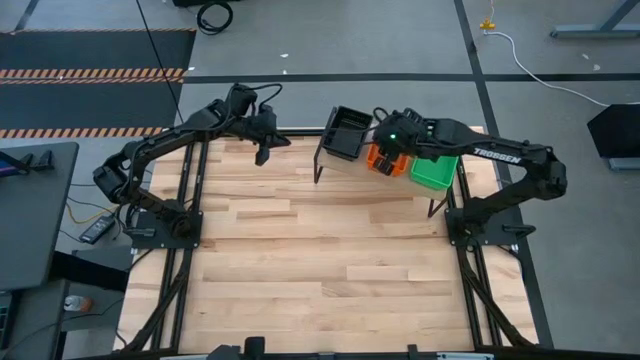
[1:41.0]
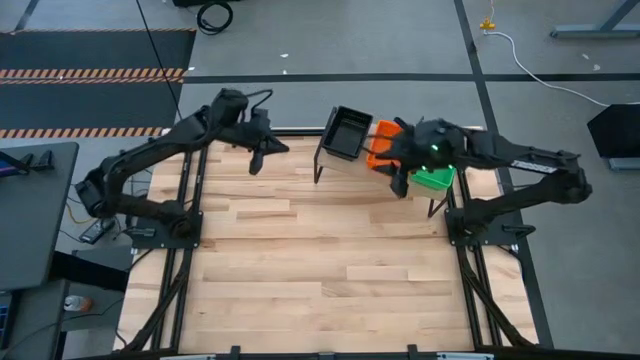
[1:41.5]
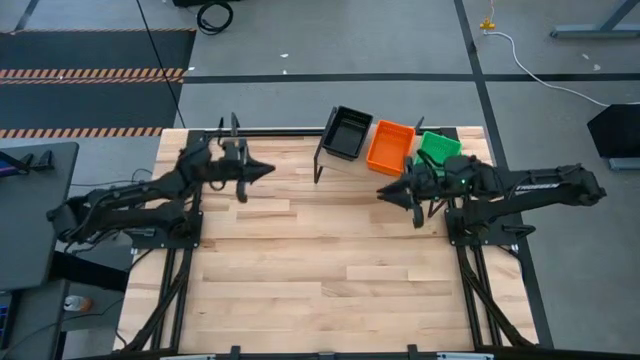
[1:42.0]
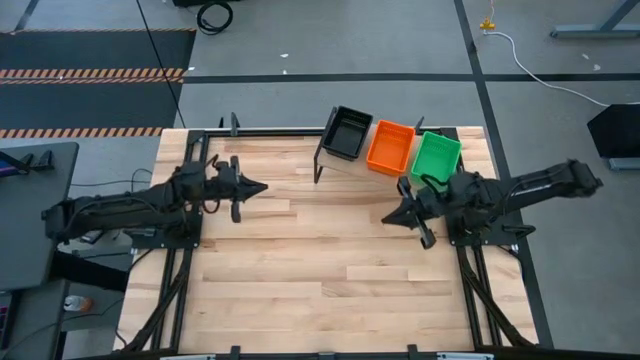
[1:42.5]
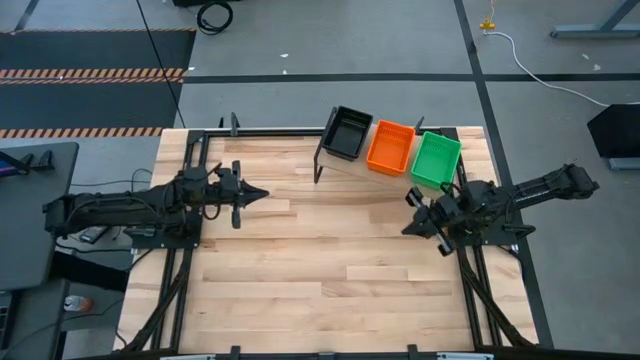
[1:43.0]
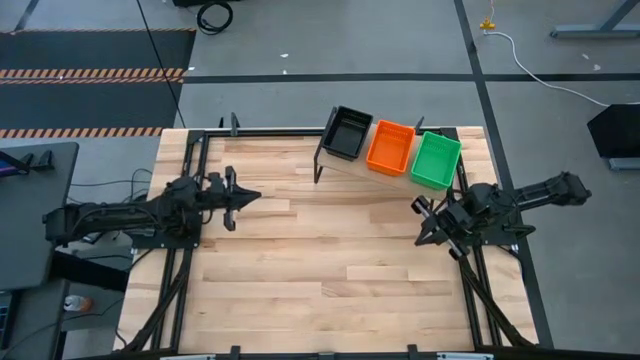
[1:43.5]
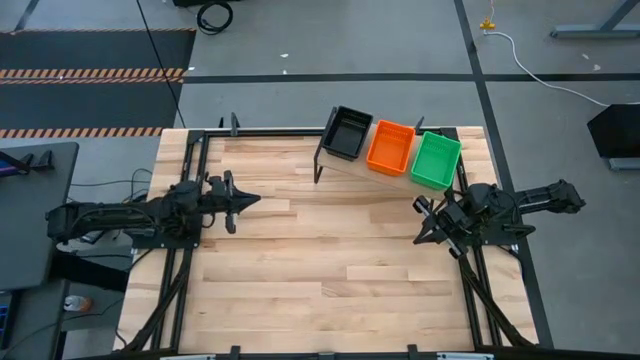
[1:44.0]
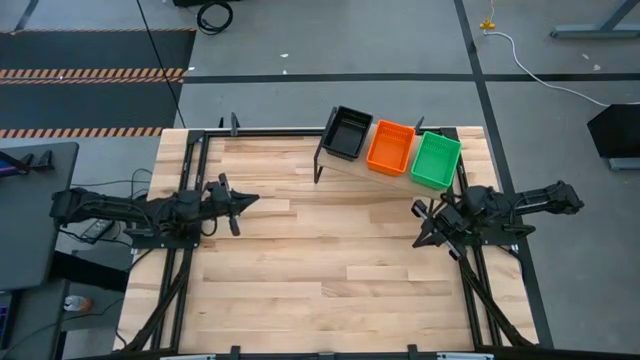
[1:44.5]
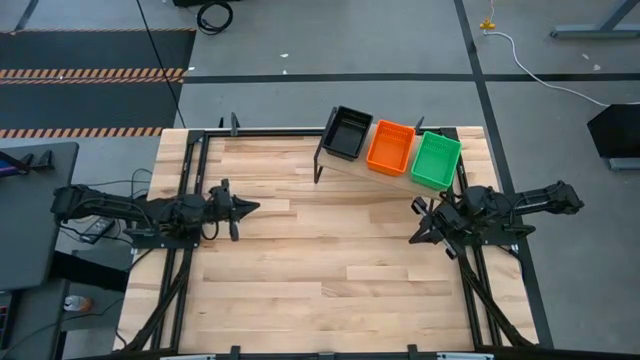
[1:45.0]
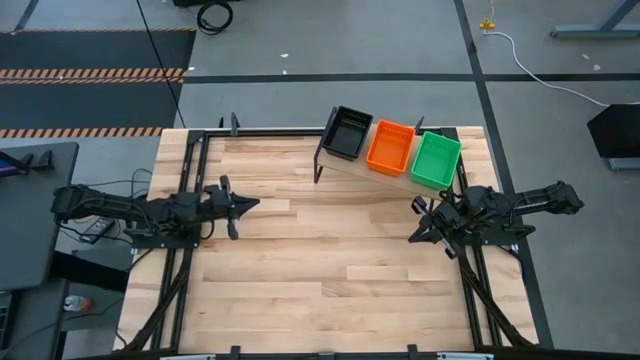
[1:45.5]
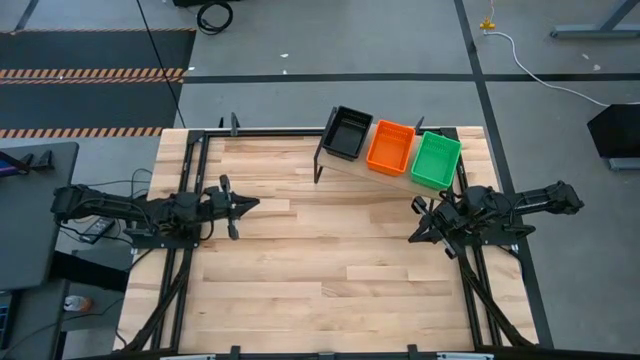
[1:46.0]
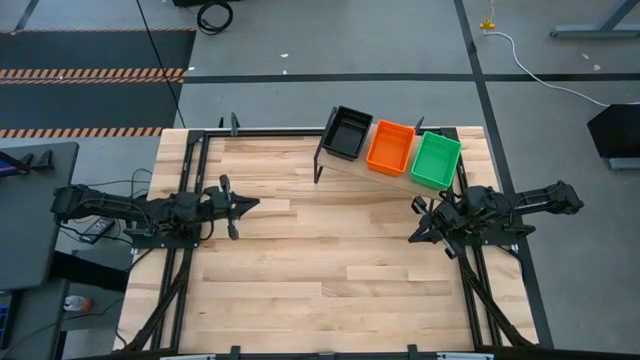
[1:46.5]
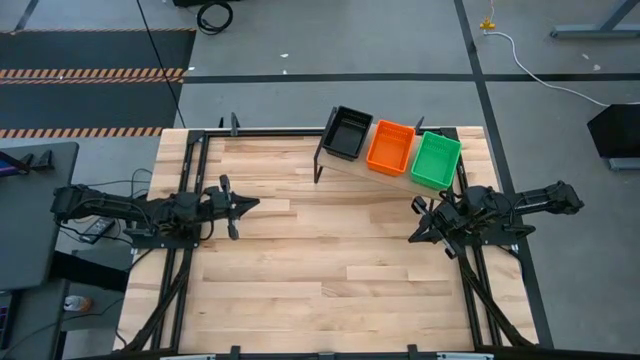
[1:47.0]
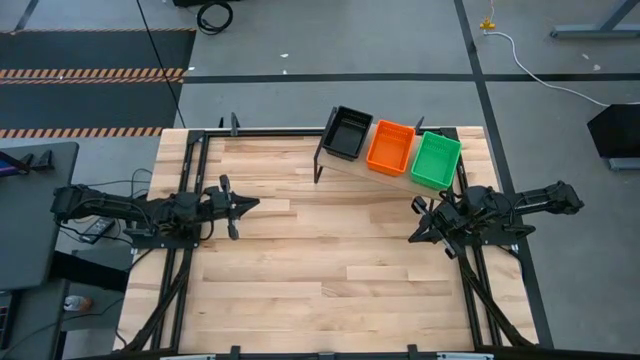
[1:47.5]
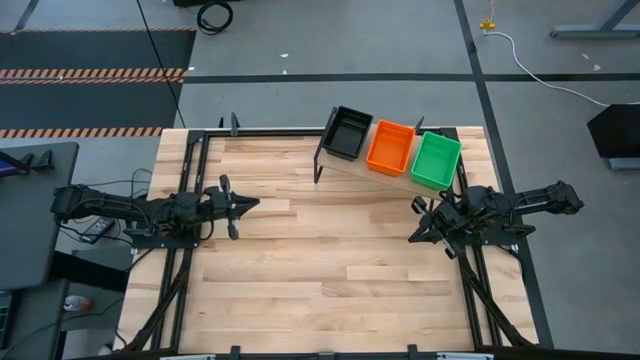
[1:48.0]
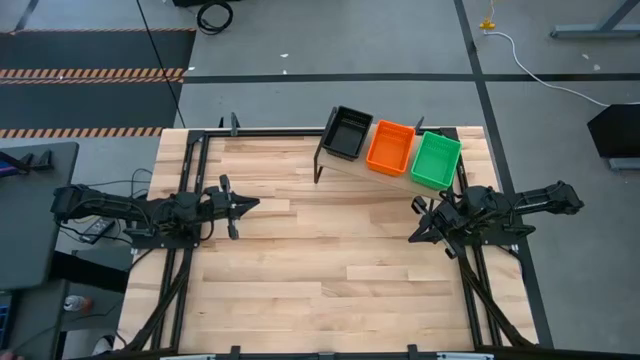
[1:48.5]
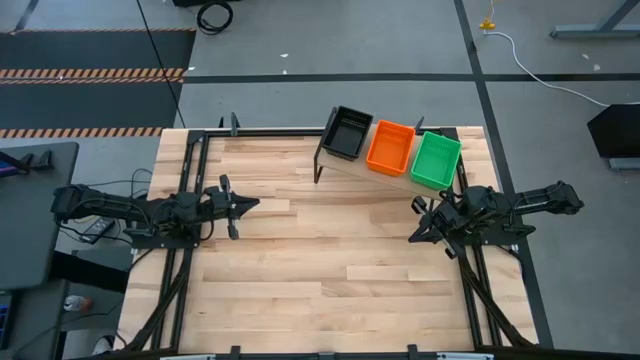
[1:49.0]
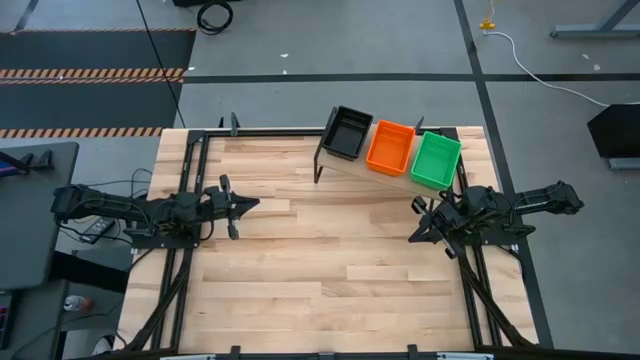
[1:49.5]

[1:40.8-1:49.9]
Task: Stack baskets on shelf by color
Return to Home Position

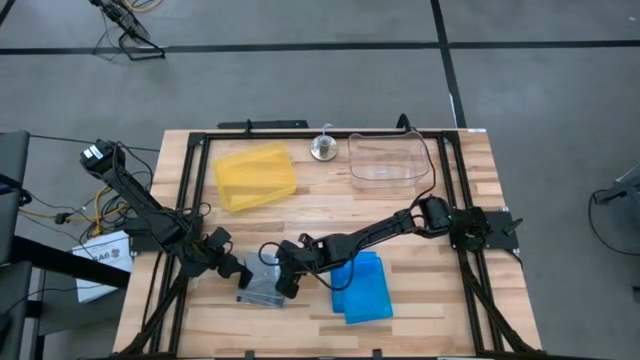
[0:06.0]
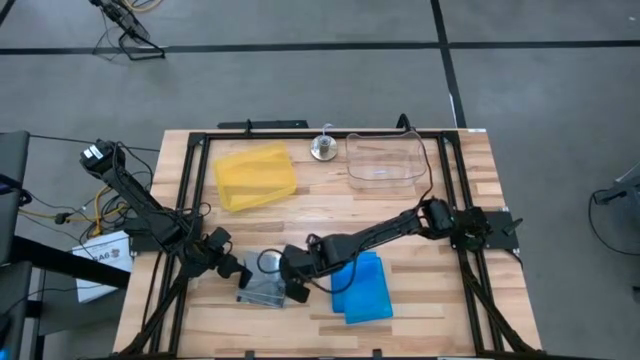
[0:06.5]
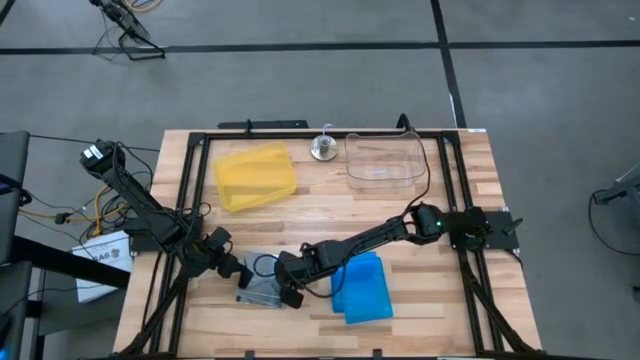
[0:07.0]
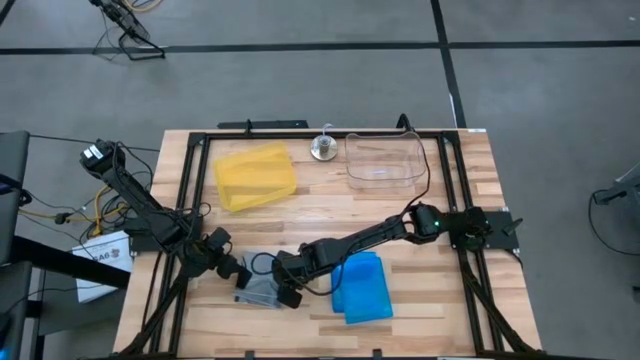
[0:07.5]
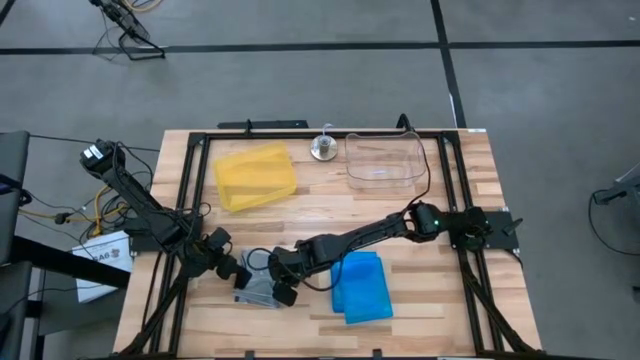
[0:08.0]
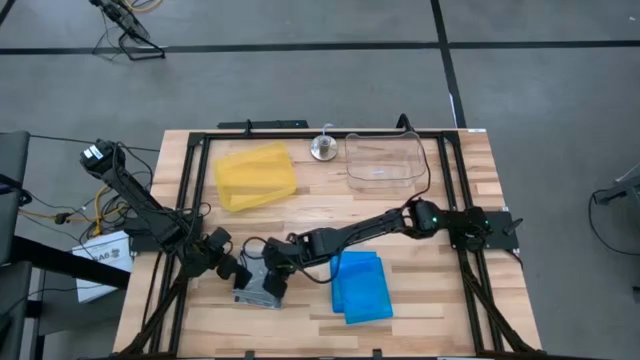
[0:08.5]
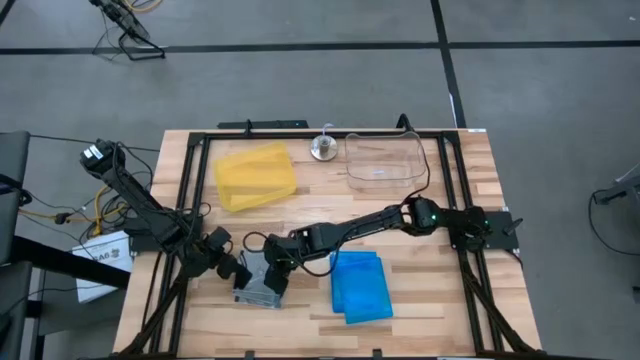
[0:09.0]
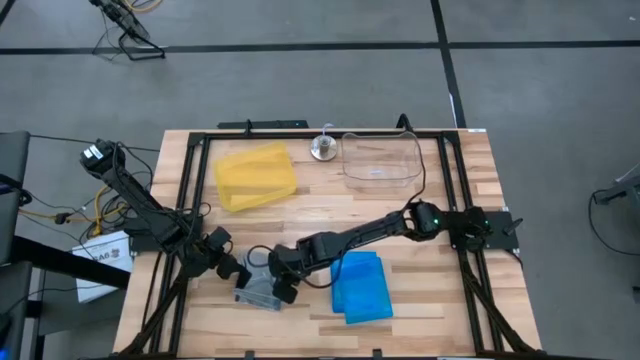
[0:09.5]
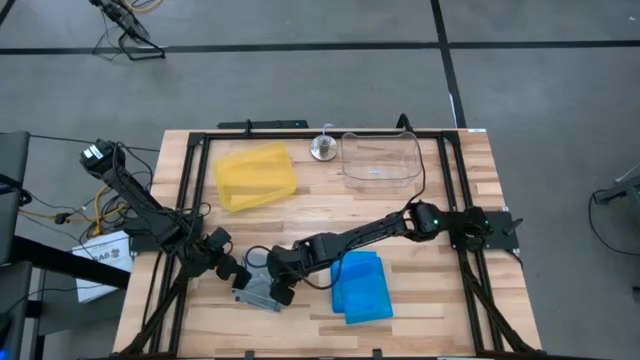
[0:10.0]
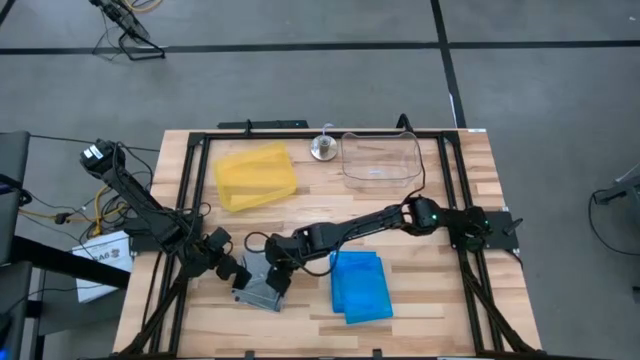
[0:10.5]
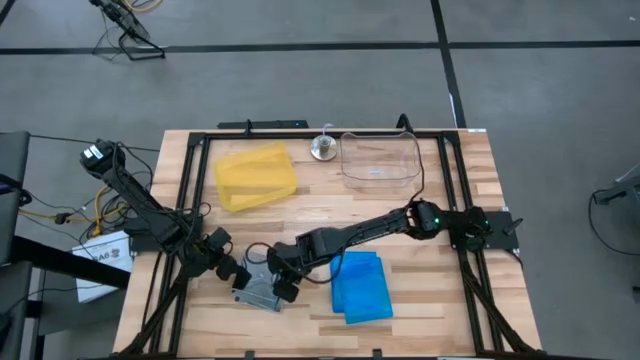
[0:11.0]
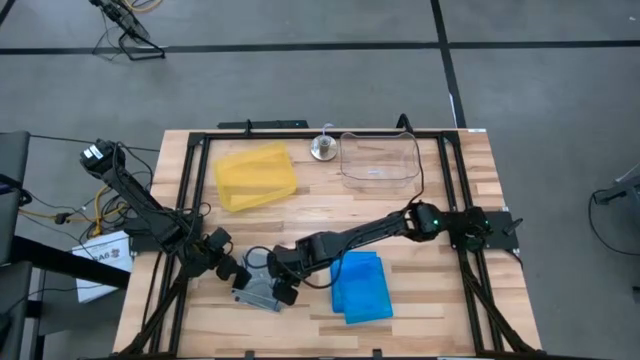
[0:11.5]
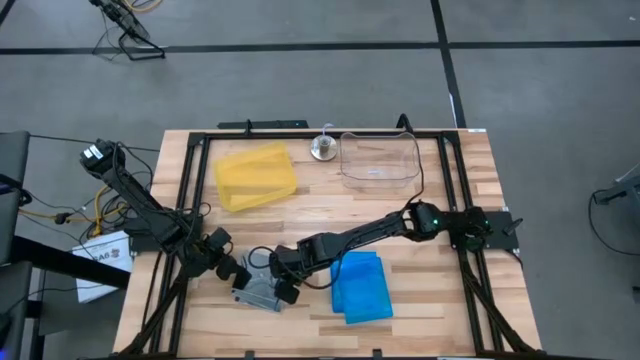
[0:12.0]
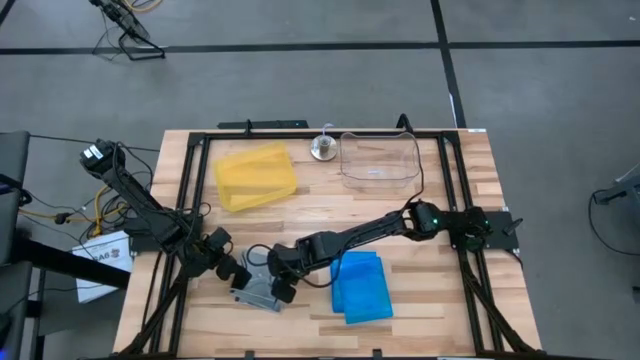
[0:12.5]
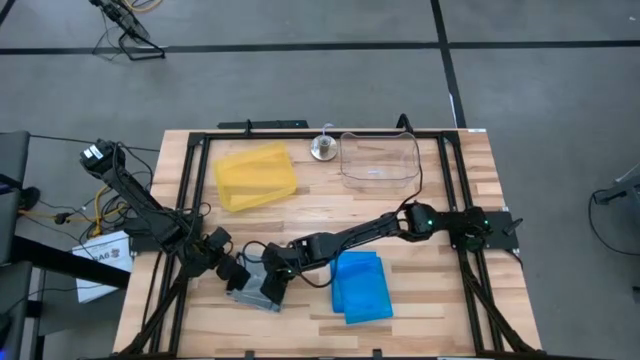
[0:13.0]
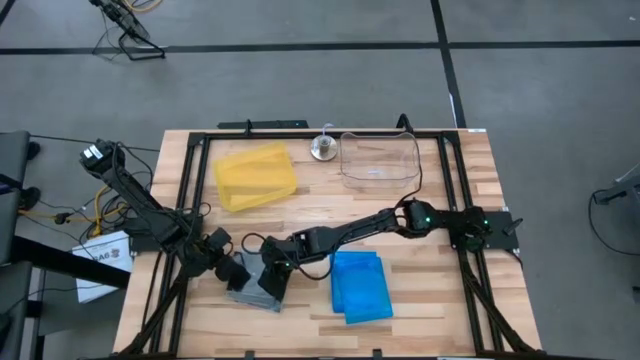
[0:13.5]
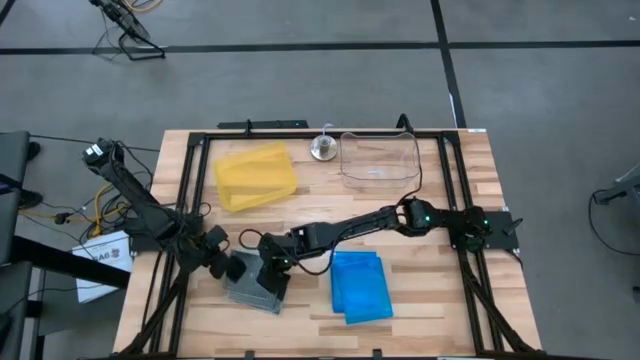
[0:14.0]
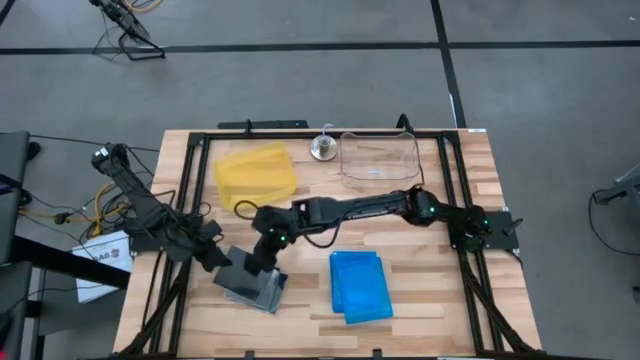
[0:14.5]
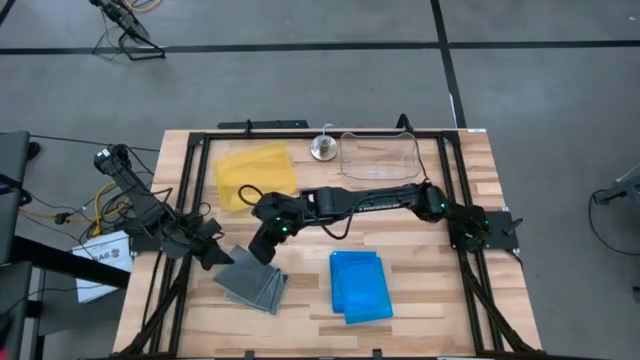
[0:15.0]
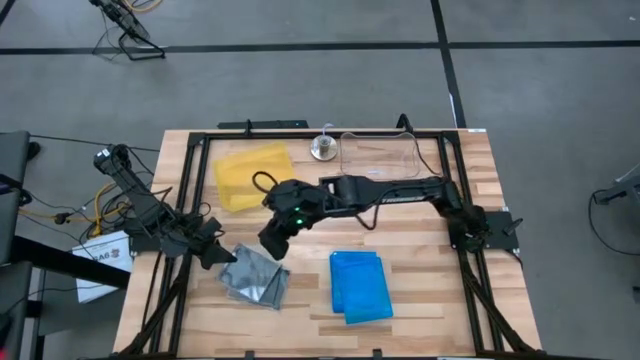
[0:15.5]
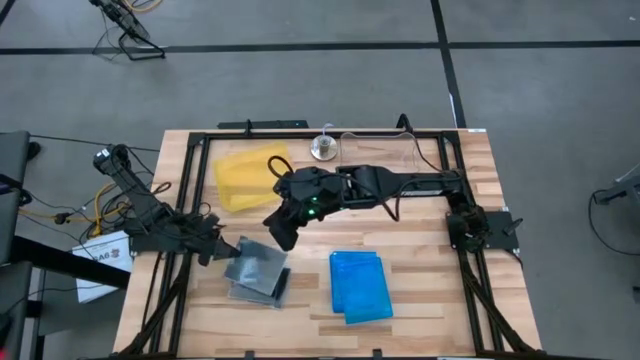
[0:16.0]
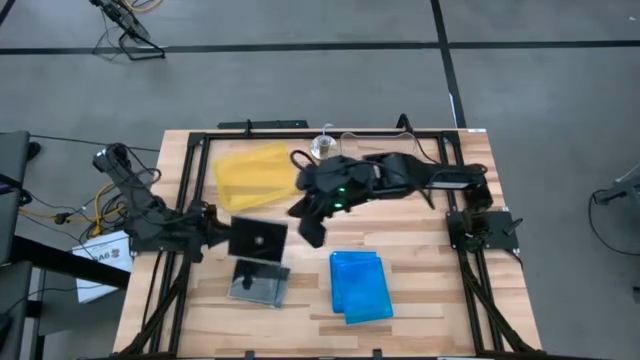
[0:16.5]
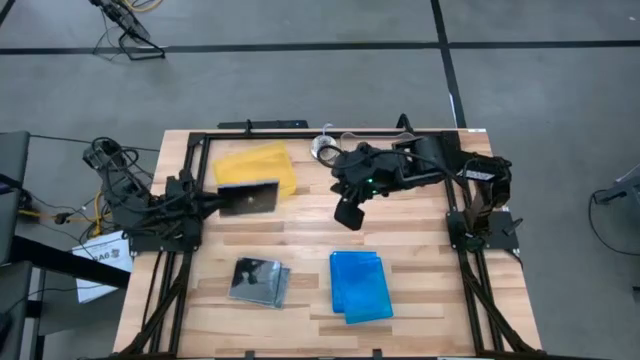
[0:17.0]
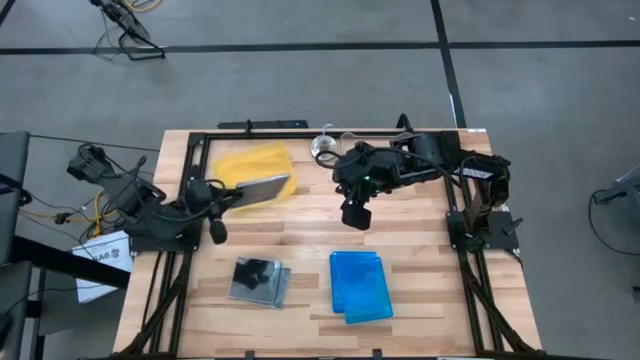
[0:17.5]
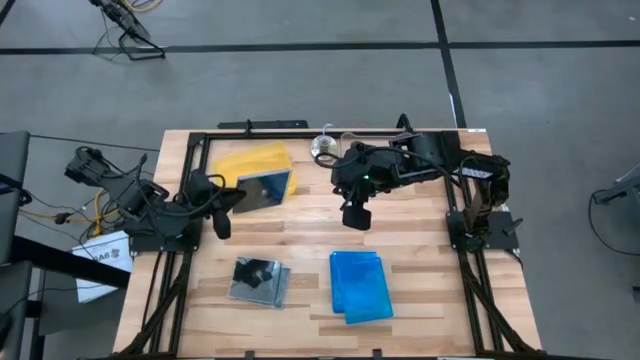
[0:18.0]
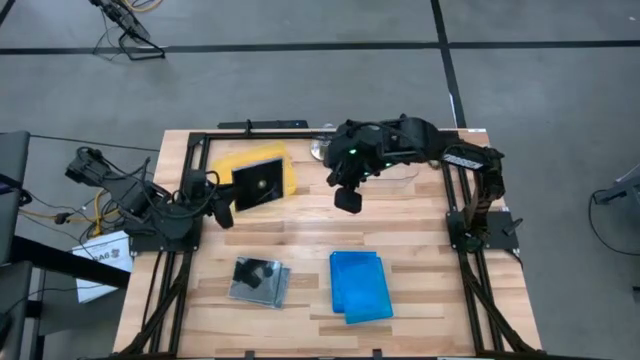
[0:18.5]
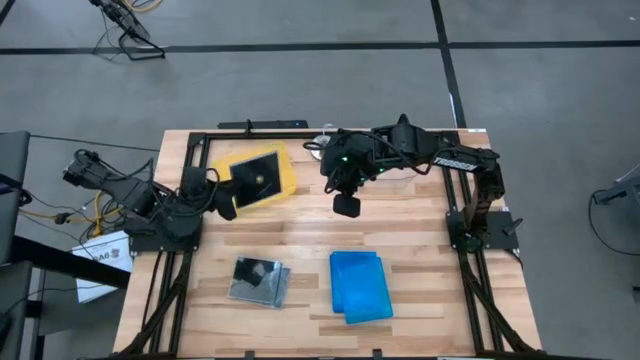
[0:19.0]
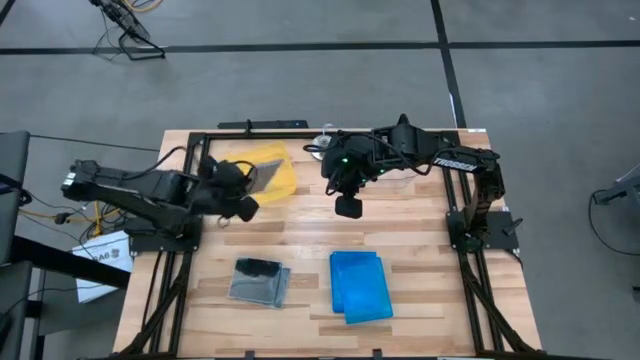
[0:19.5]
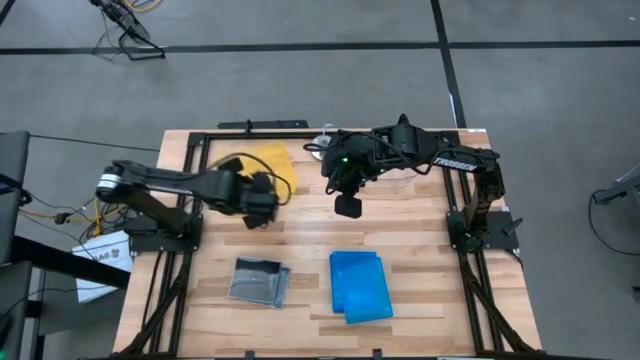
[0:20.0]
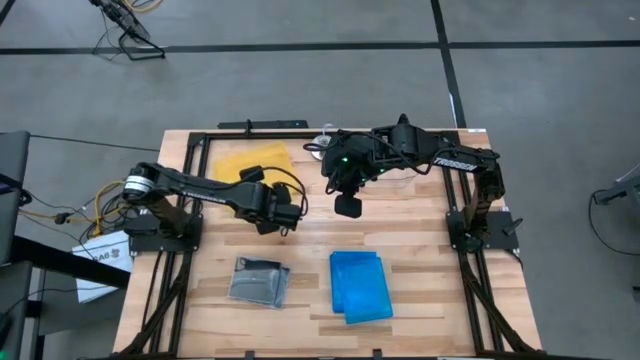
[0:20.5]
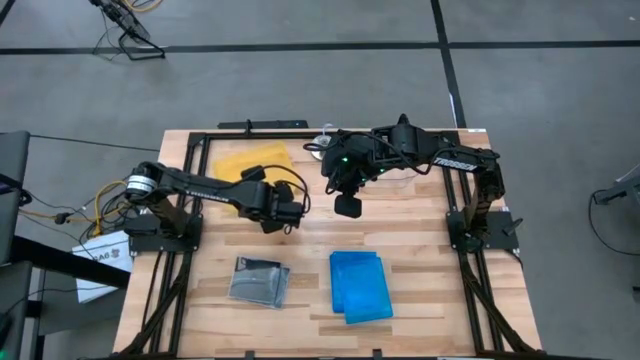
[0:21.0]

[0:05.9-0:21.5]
Task: Pick & place jewel cases by type
Put the top black CD case into the yellow bin
